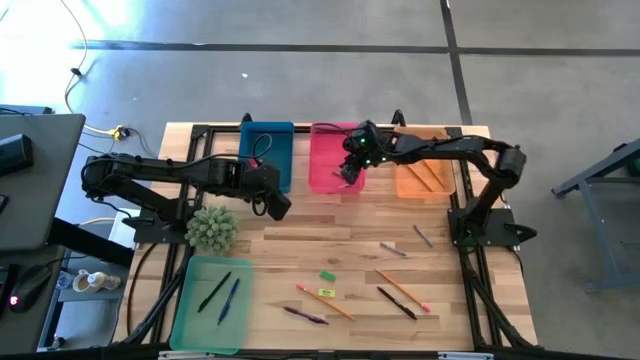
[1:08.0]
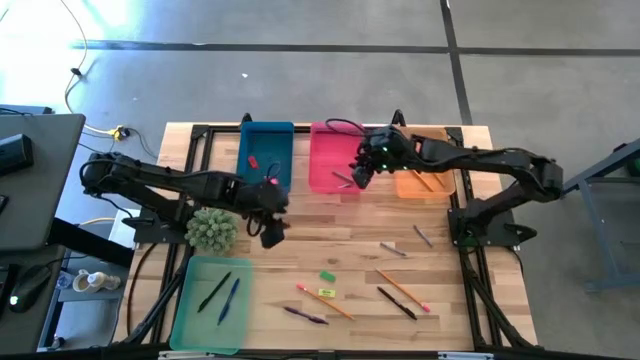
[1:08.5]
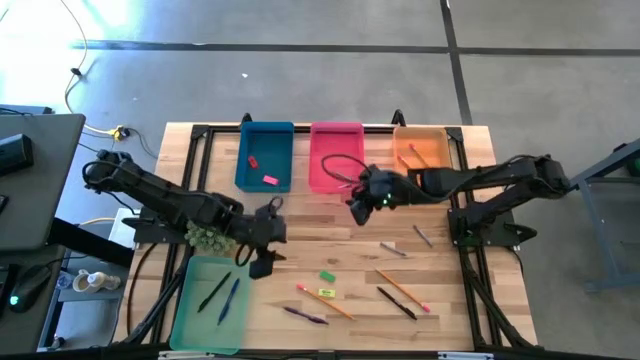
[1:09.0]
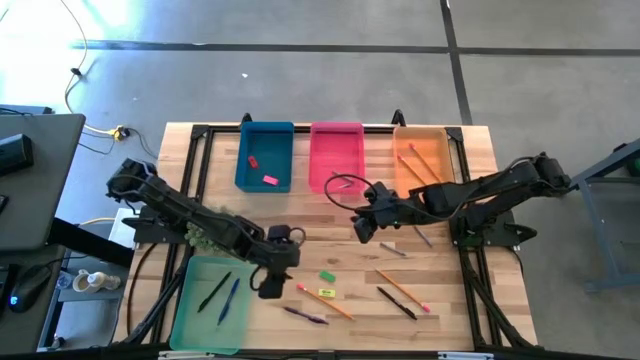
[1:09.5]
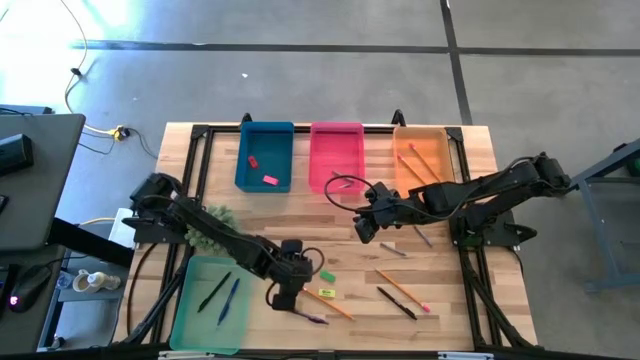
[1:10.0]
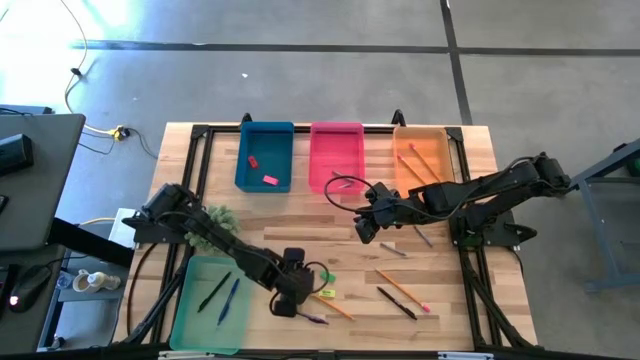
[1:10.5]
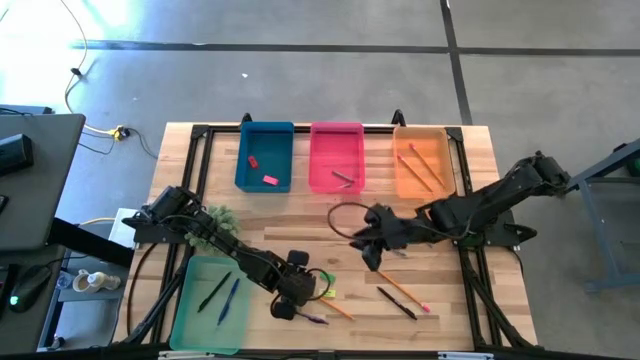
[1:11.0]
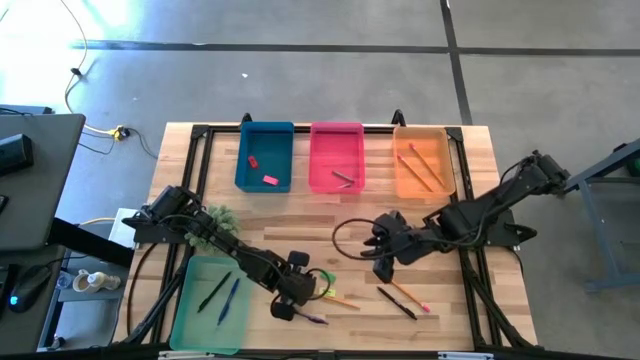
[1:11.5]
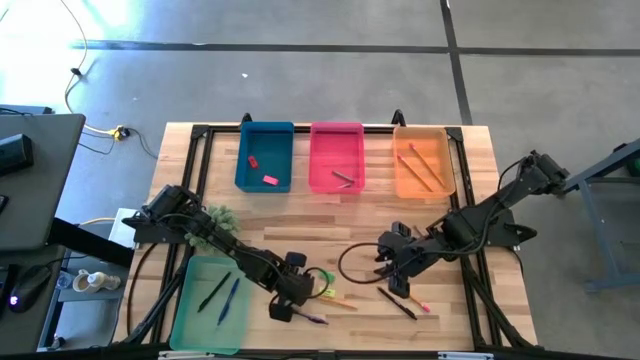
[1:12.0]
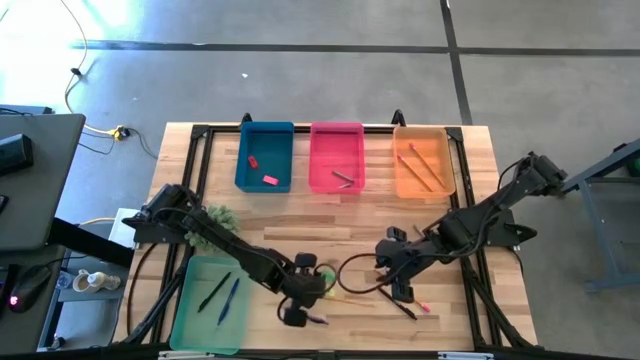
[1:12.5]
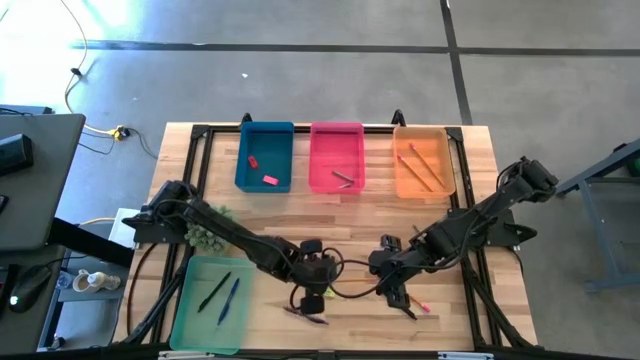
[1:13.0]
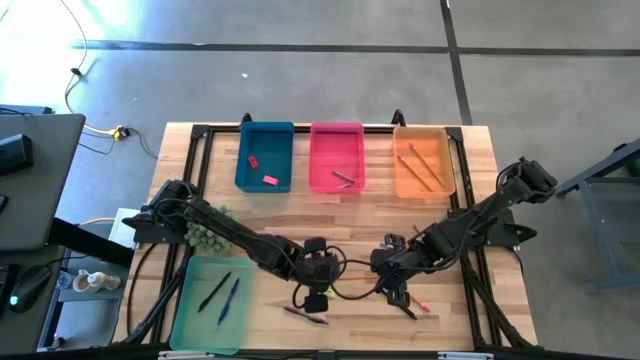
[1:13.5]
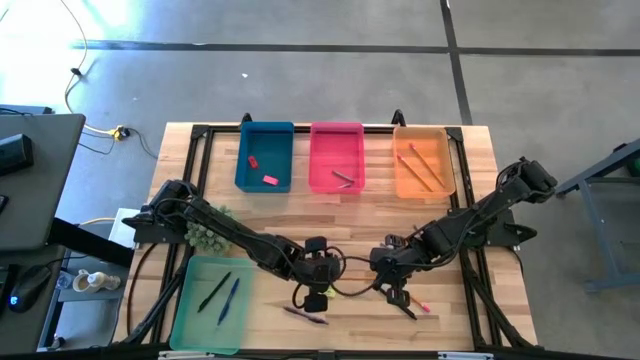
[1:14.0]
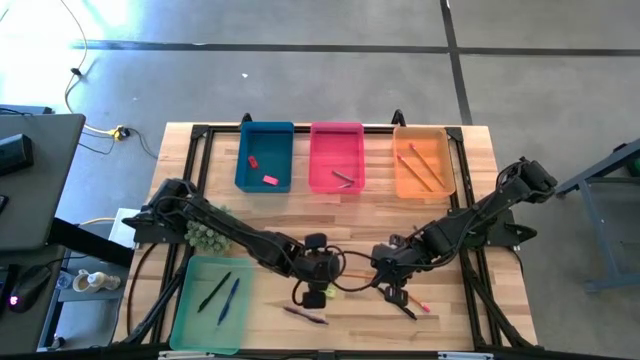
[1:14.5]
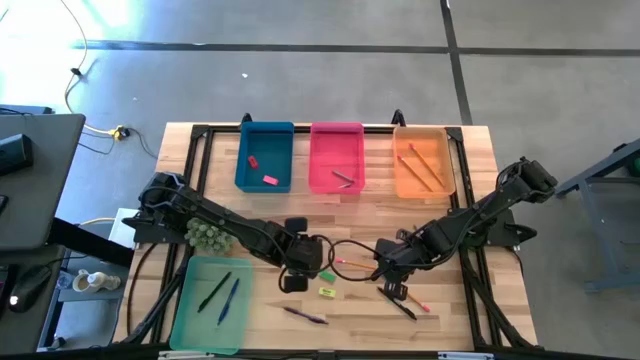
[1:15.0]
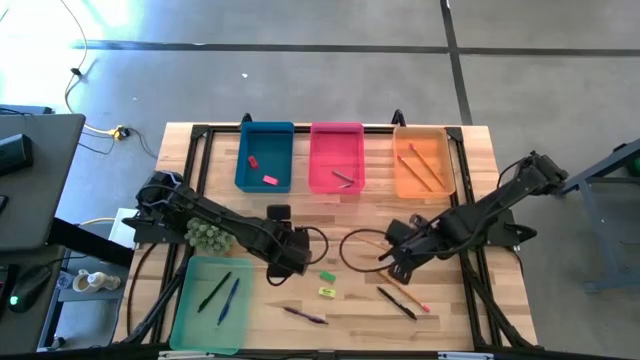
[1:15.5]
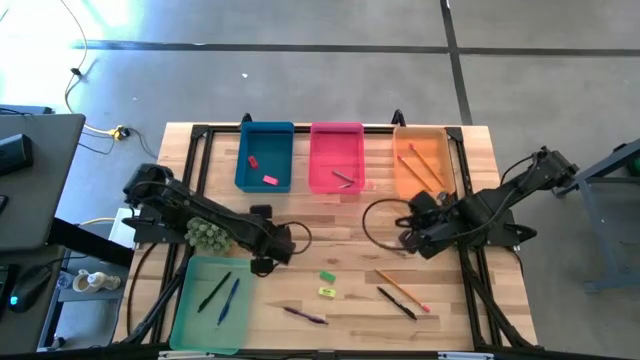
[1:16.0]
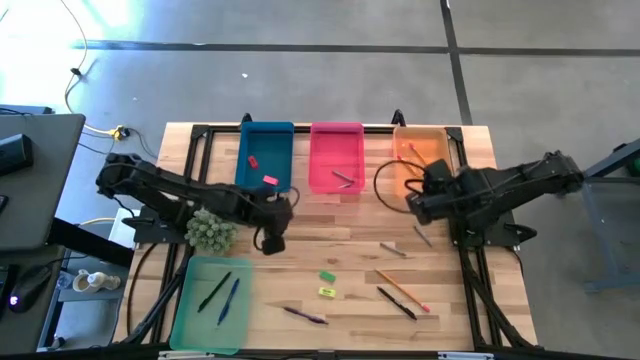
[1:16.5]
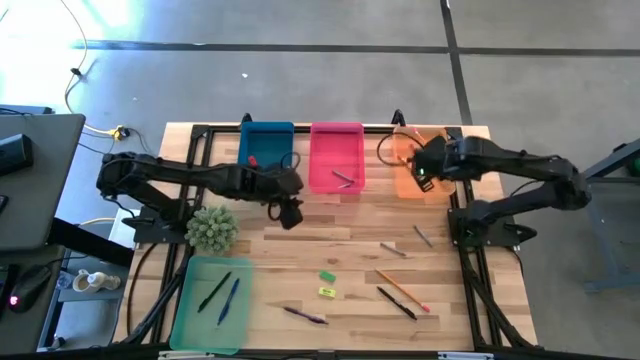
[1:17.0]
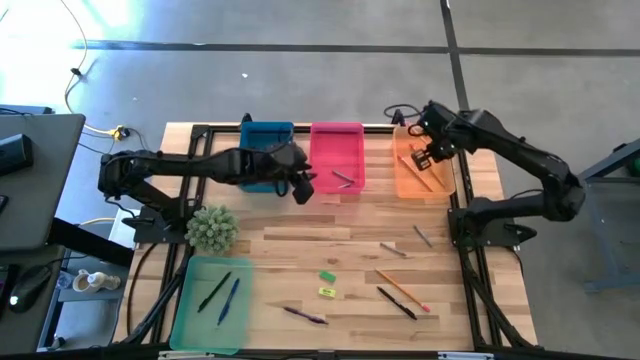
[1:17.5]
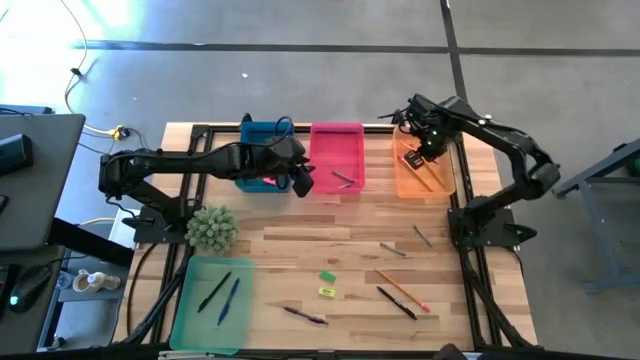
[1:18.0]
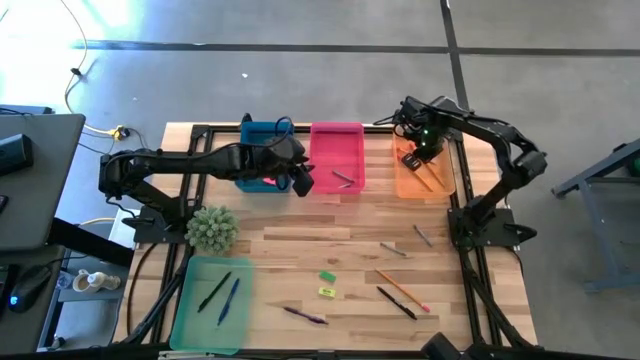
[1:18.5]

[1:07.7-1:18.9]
Task: Sort crayons/erasers/pens/pencils in bins
Put the left pencil into the orange bin

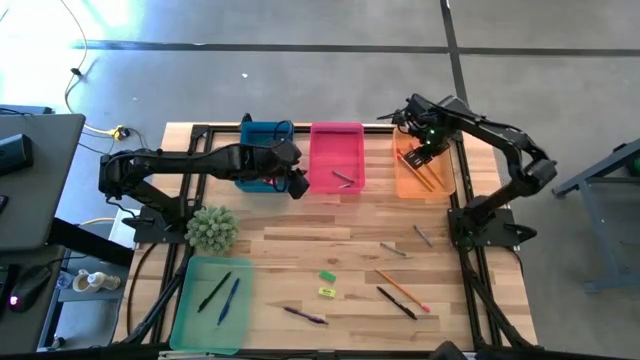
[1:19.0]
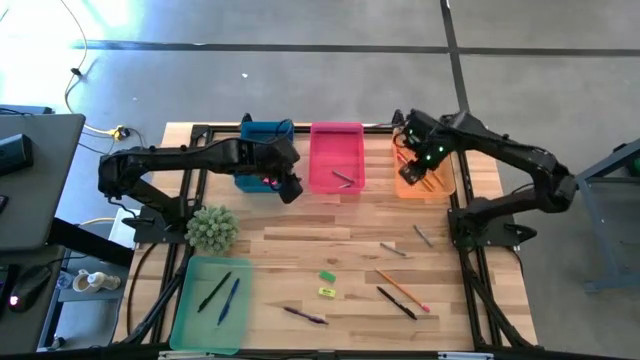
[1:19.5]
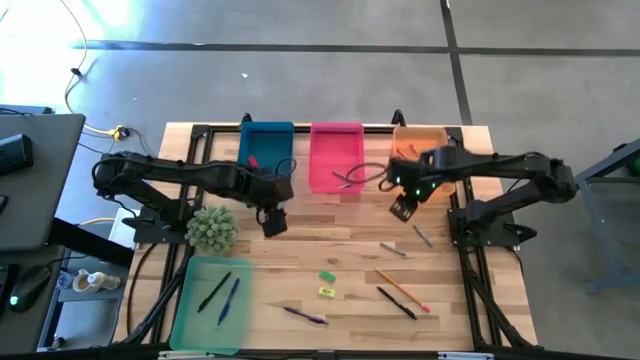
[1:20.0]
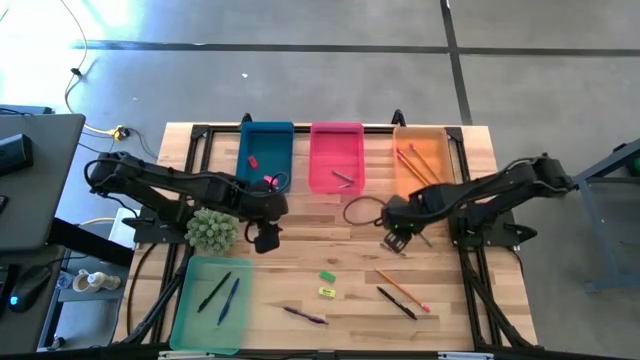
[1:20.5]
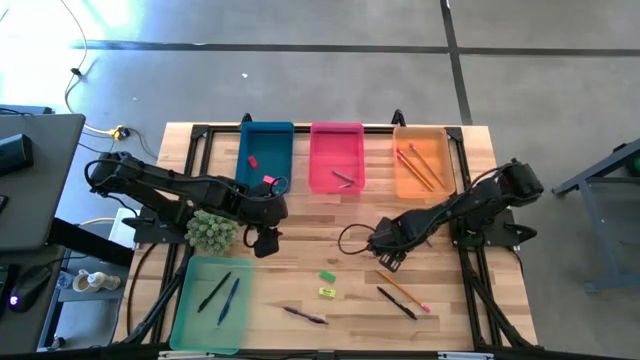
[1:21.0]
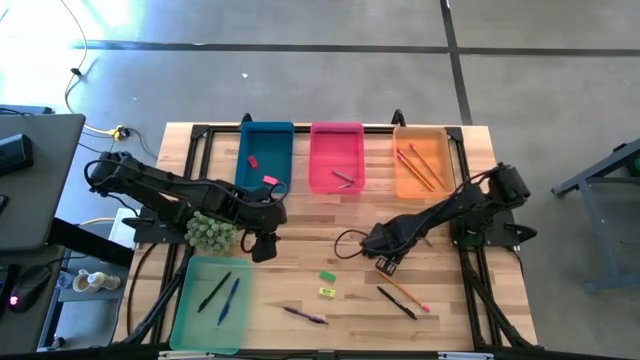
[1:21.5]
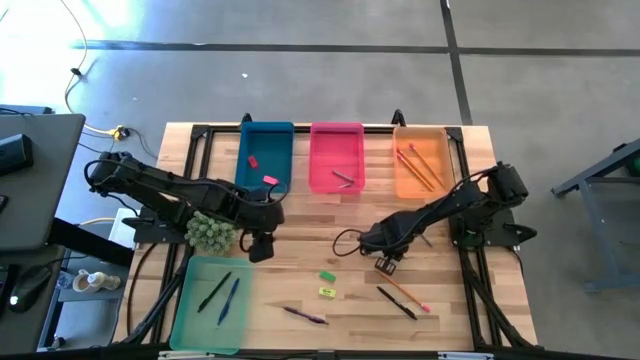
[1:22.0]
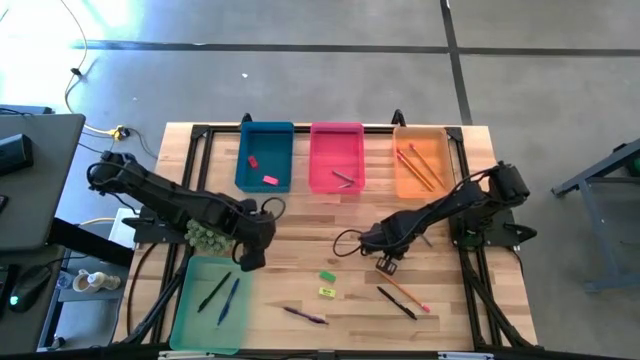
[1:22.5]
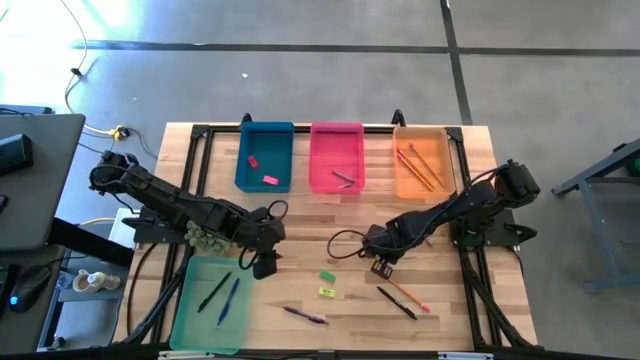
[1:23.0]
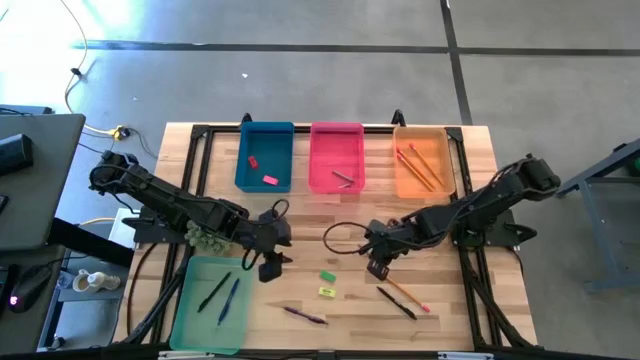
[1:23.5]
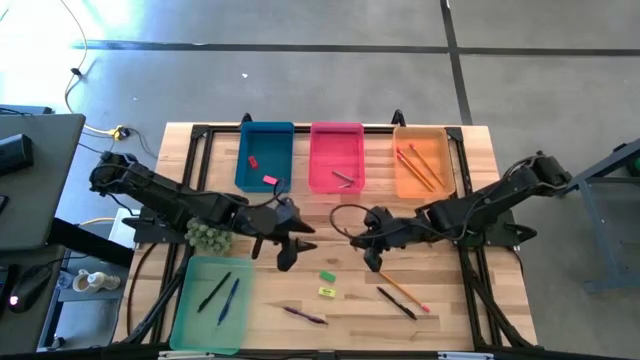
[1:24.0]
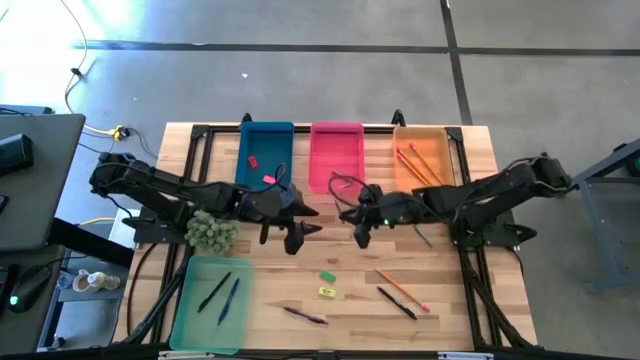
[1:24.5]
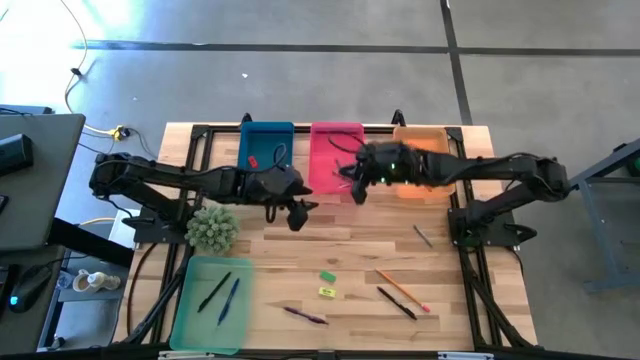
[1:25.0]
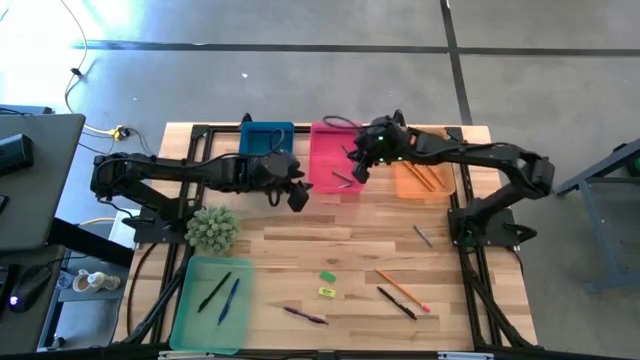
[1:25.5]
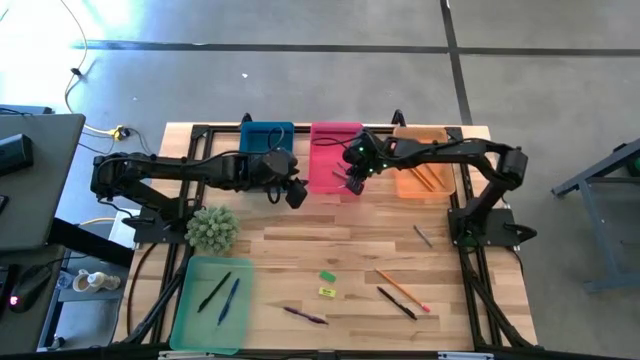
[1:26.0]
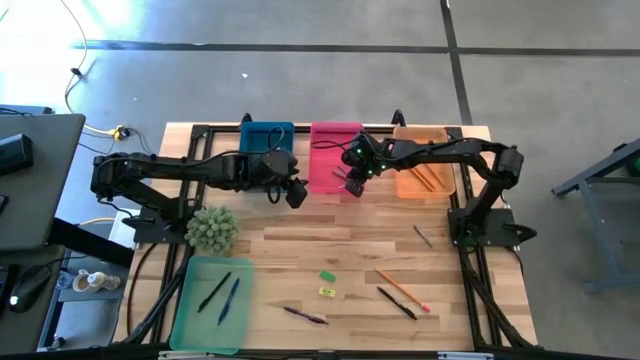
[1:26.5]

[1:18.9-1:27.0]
Put the left gray crayon into the pink bin

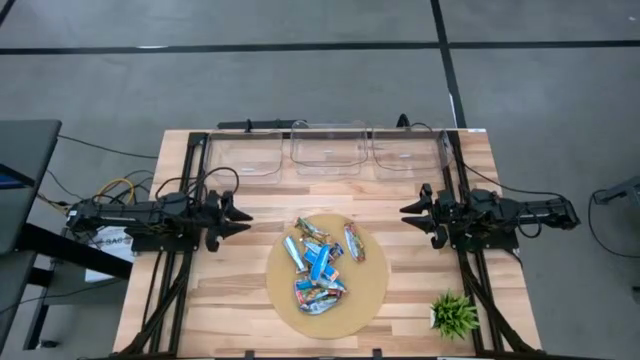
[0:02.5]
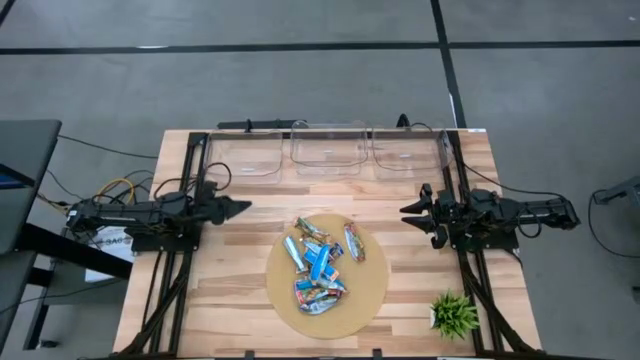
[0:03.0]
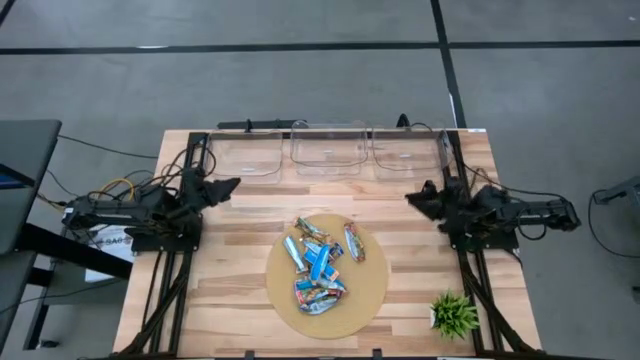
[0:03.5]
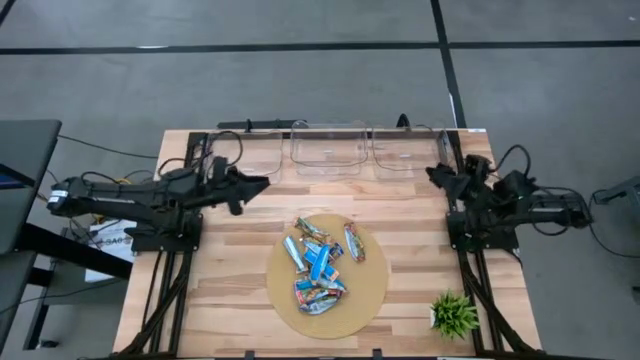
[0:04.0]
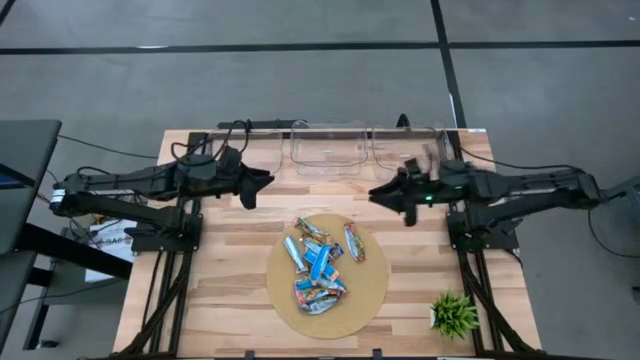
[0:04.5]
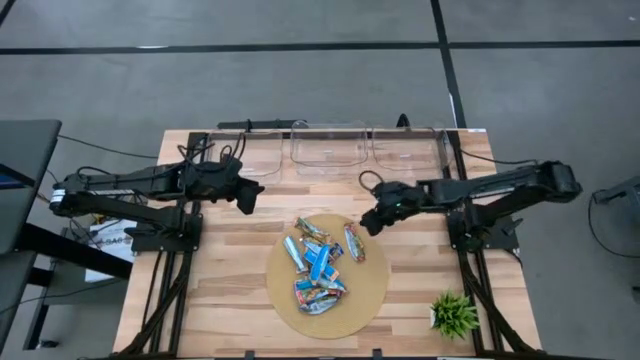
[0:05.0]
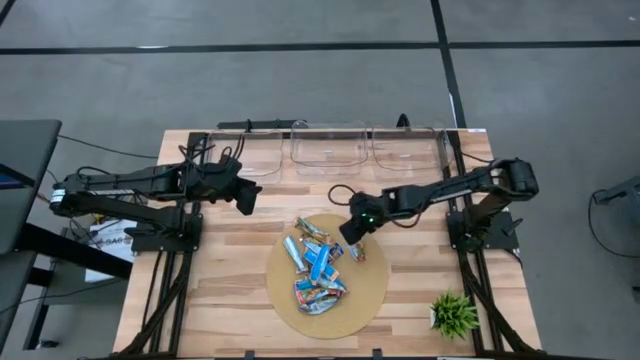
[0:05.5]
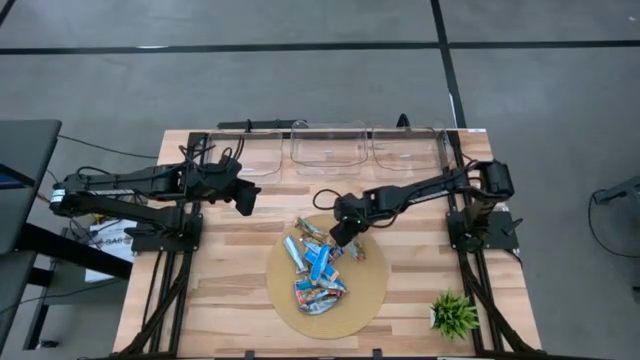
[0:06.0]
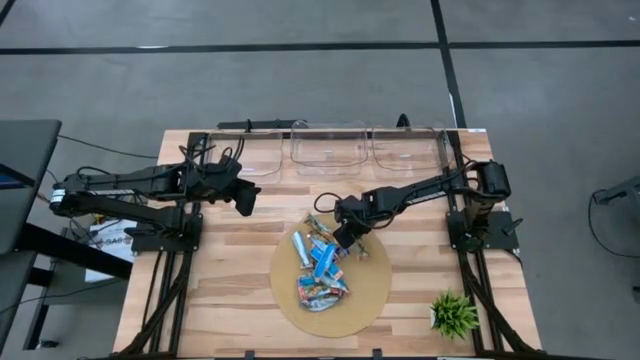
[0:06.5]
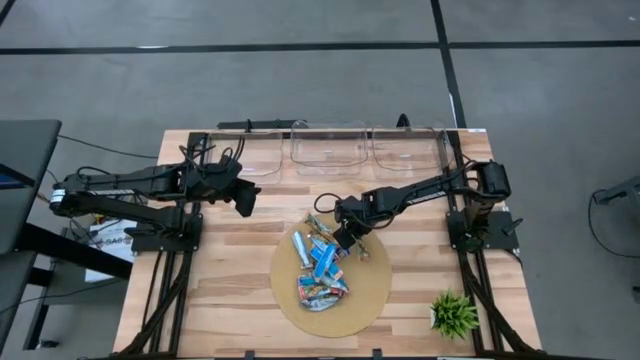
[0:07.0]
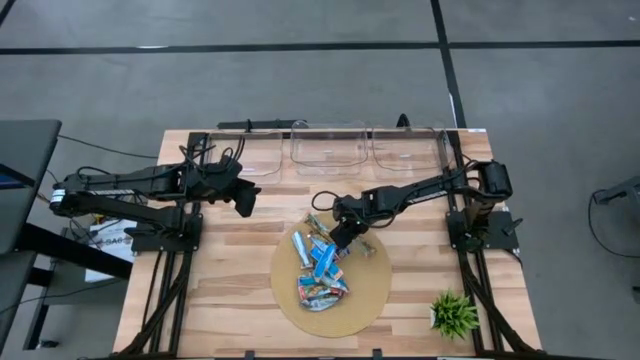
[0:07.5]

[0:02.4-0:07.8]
Task: Pick and place Granola Bars by type
Put the red granola bar into the right transparent bin
